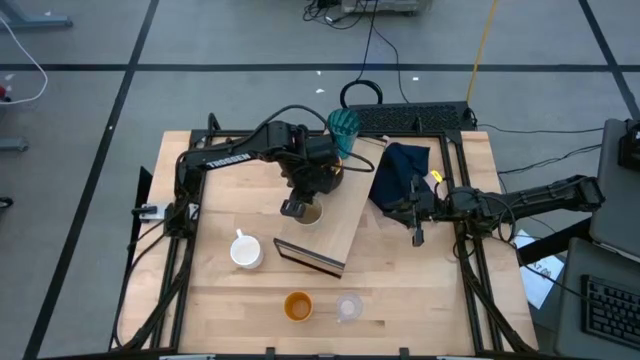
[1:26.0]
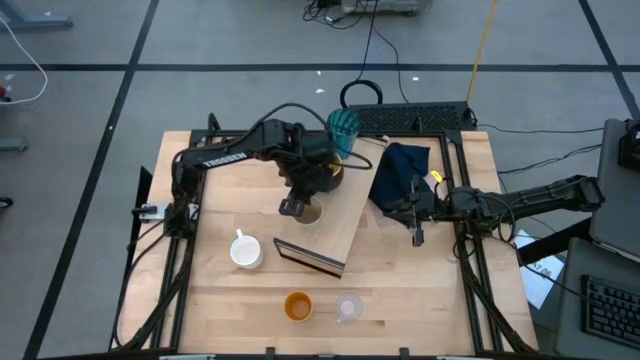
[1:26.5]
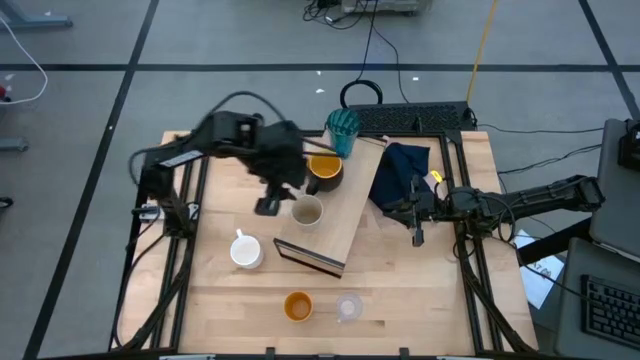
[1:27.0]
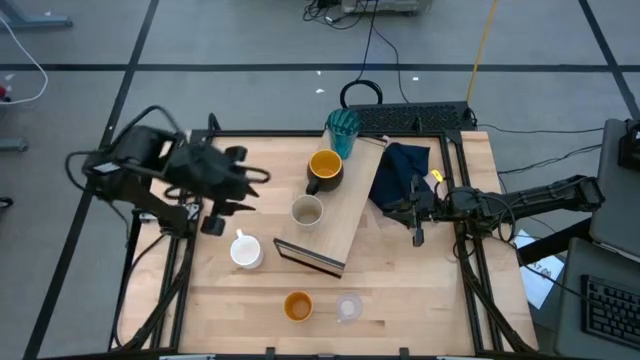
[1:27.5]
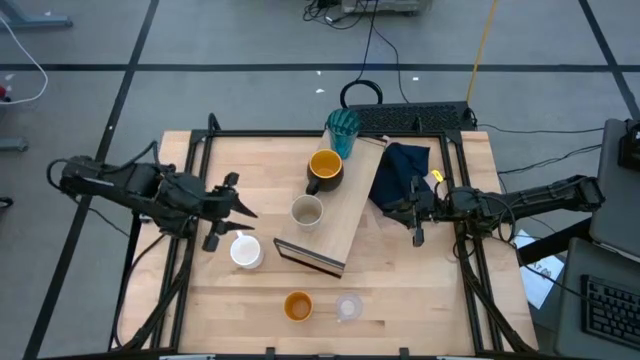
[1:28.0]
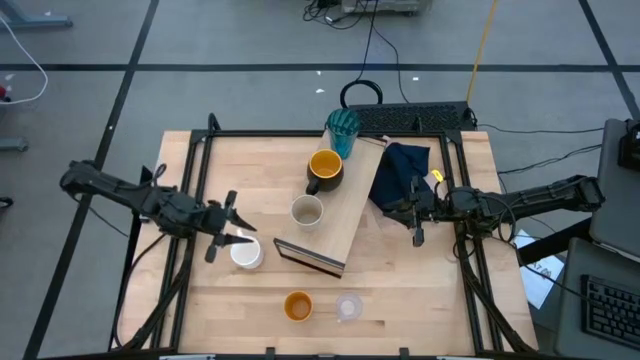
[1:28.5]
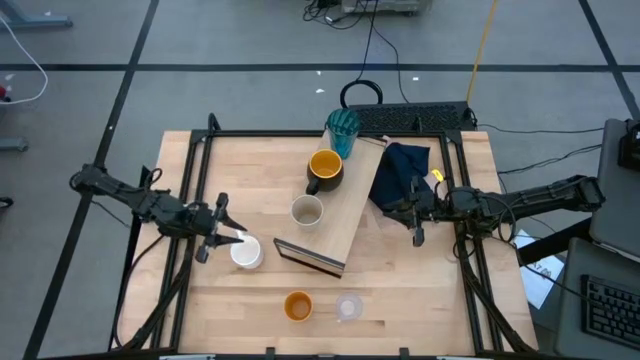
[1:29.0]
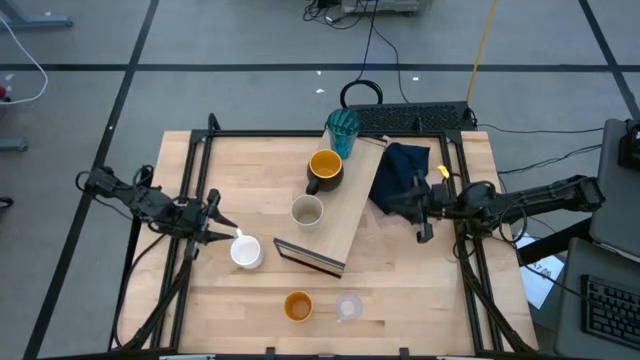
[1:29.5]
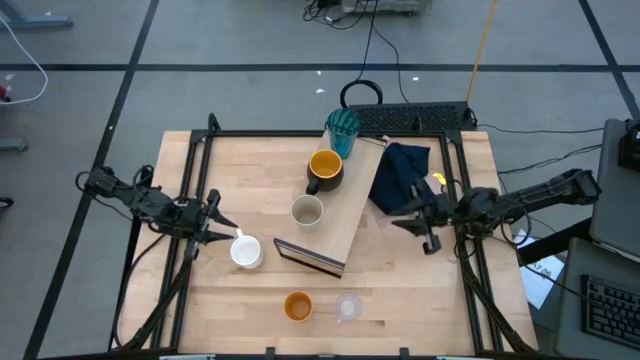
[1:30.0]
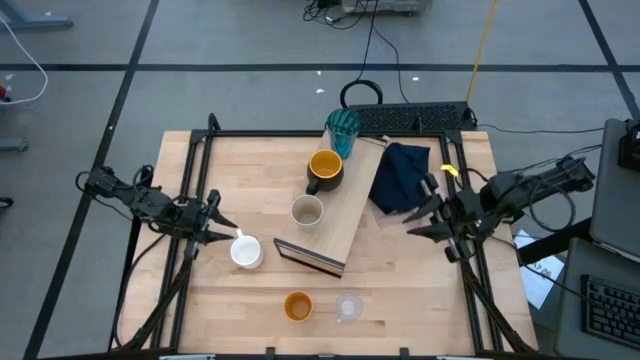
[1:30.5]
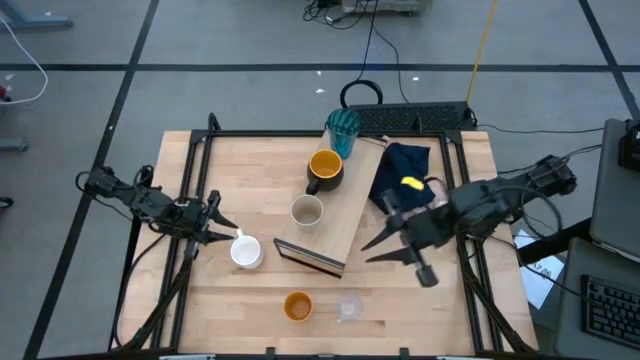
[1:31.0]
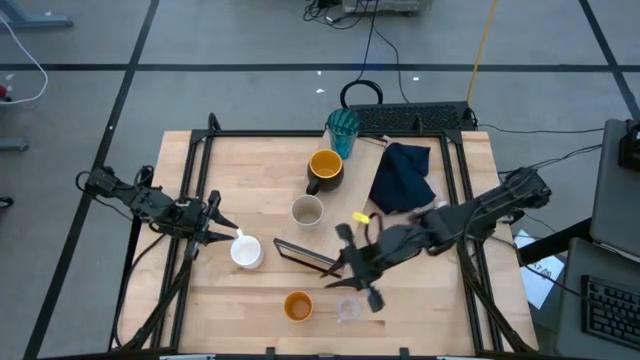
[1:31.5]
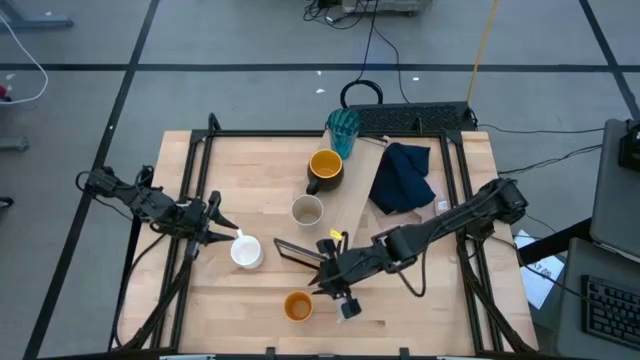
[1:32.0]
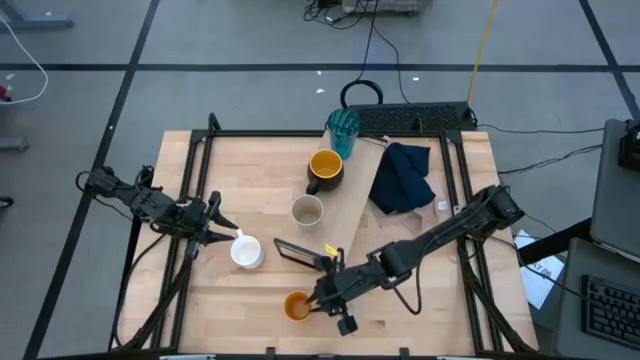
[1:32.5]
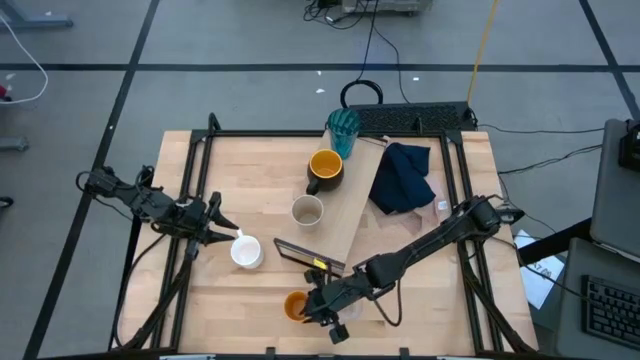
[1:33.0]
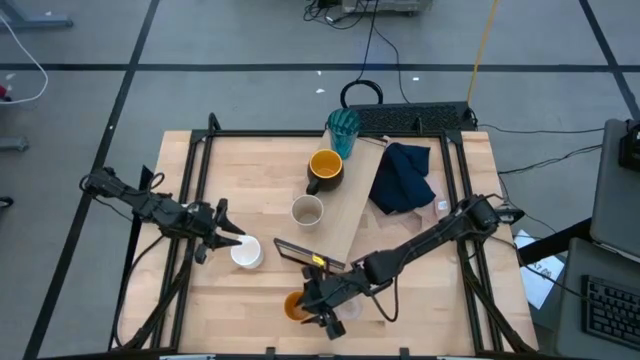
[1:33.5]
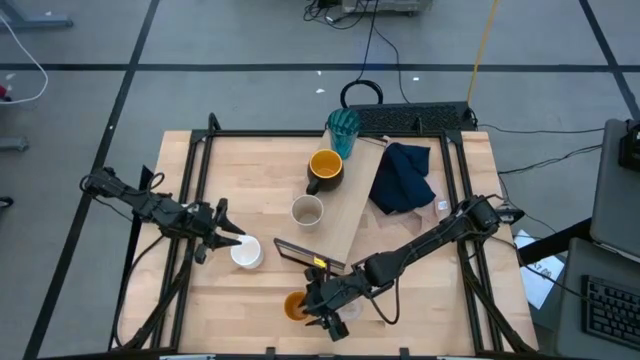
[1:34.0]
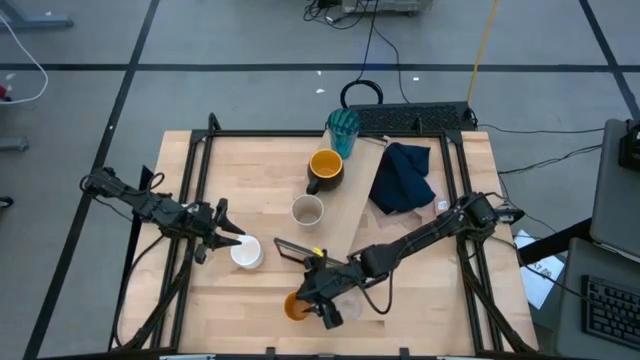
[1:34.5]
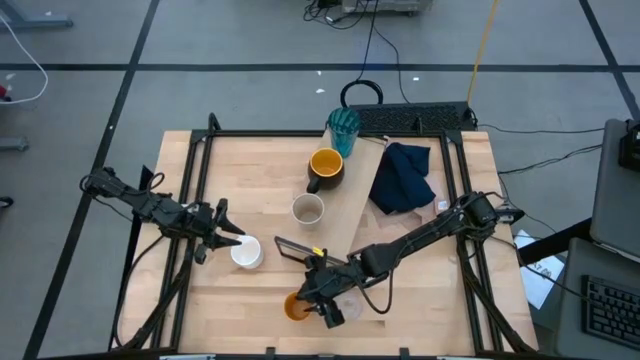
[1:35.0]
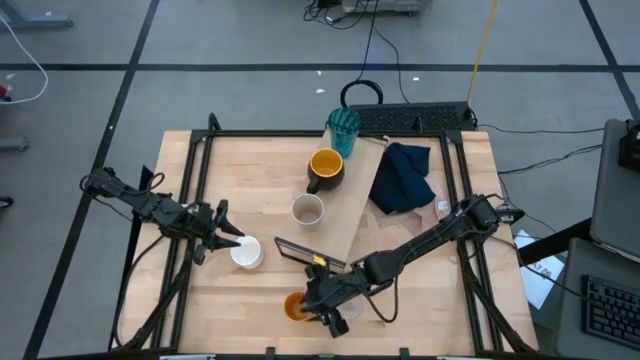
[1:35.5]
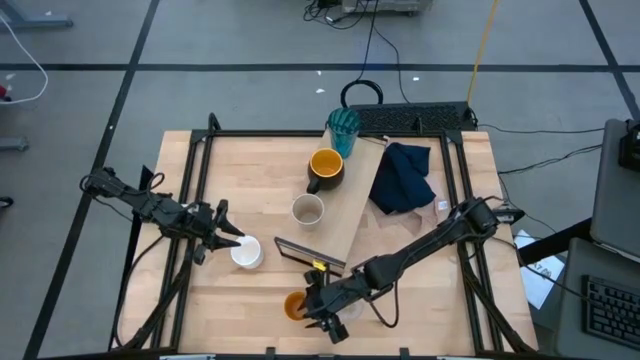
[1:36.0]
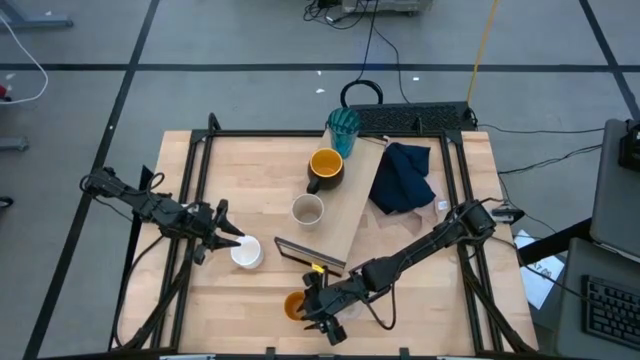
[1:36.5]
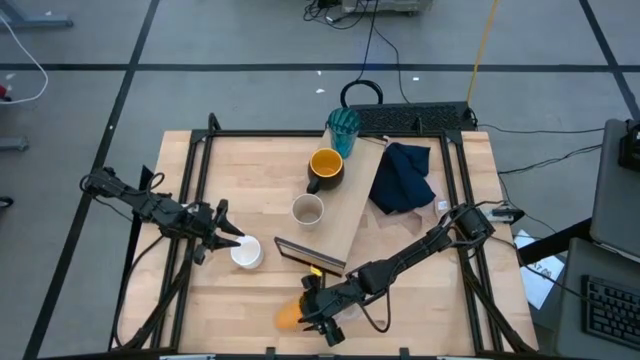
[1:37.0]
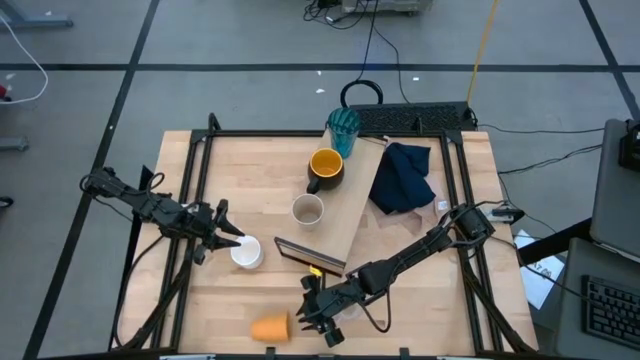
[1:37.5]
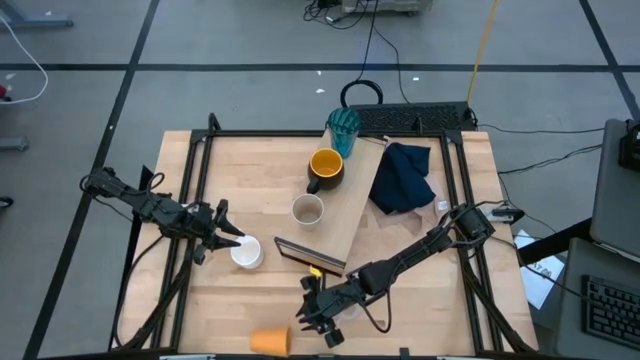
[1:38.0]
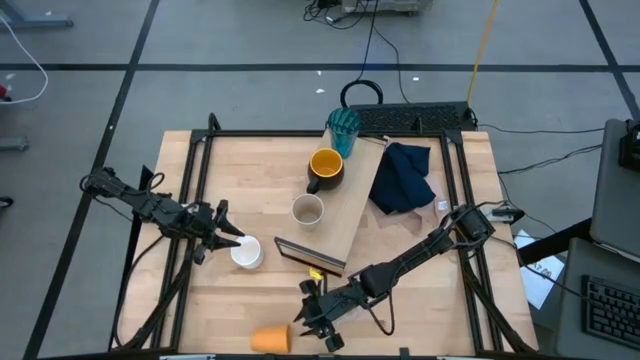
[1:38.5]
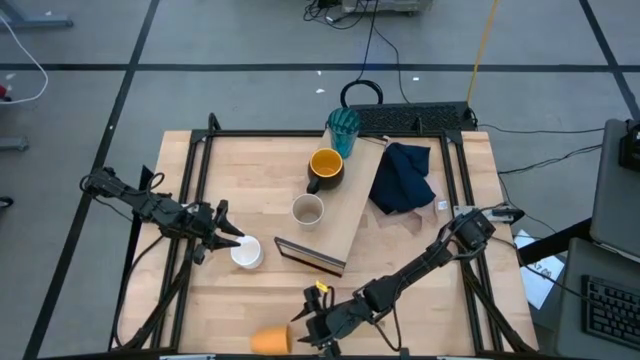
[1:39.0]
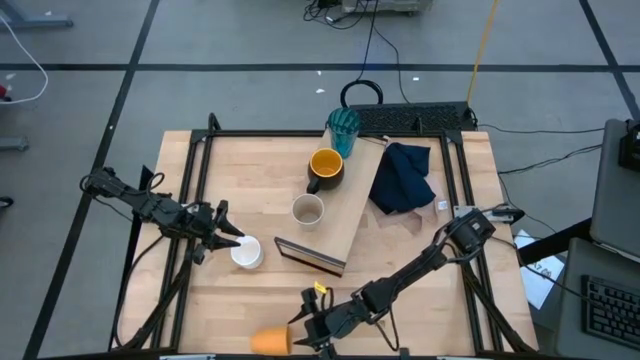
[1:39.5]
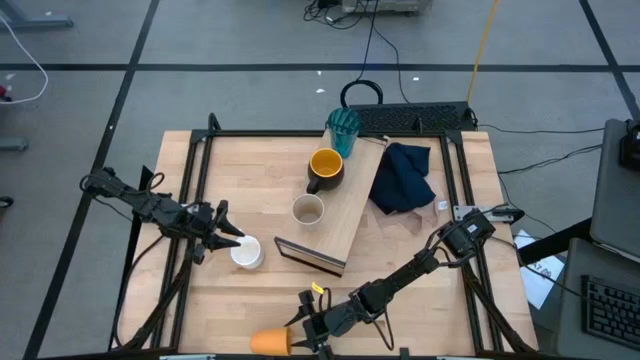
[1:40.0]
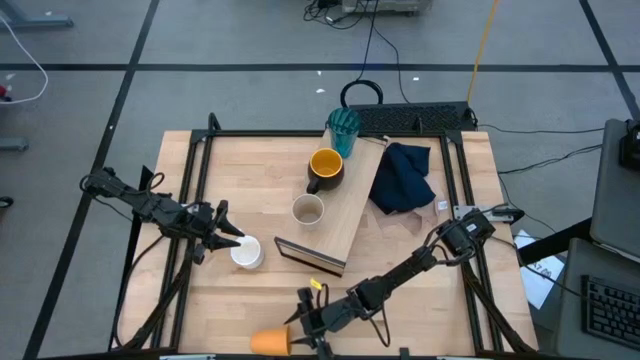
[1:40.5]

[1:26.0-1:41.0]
Task: Stack small to large cups/mugs on shelf
Put the yellow cup on the shelf

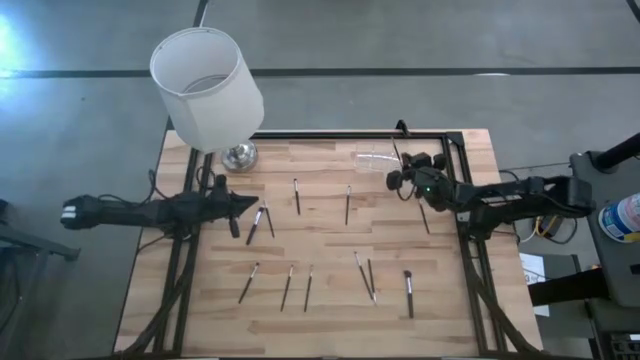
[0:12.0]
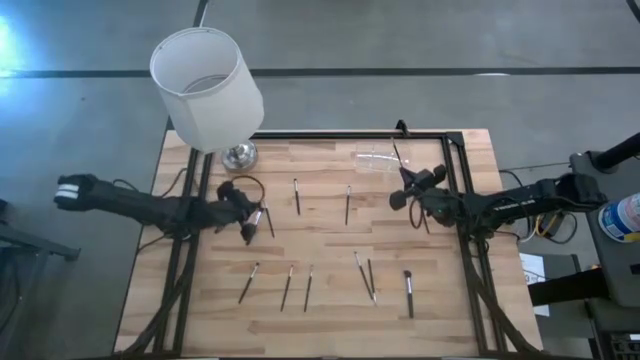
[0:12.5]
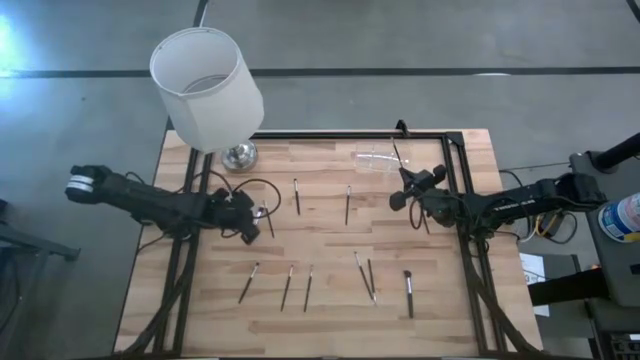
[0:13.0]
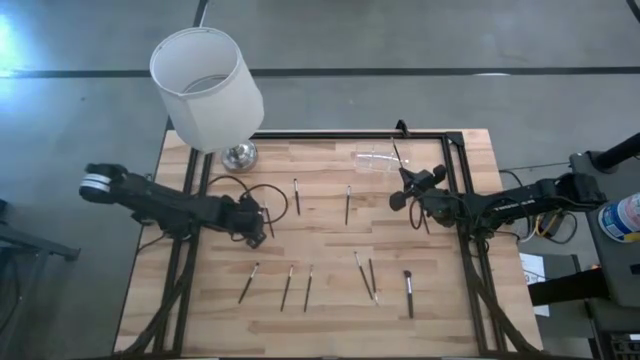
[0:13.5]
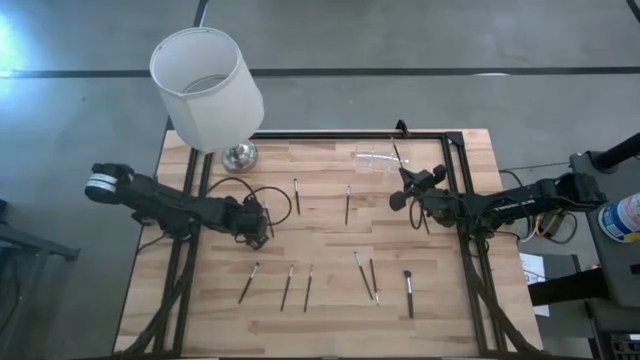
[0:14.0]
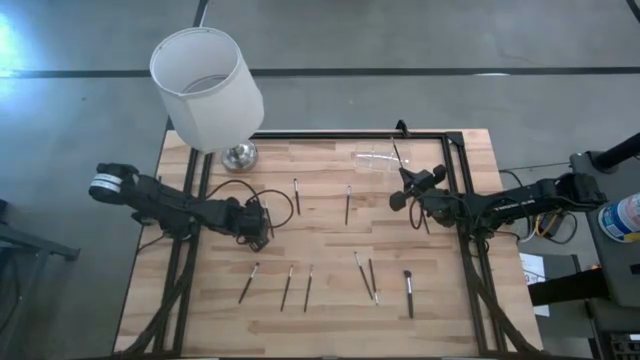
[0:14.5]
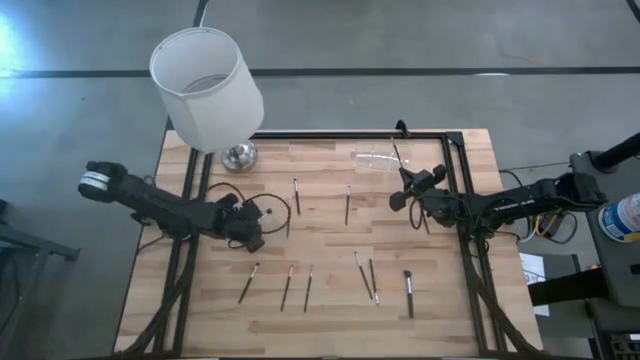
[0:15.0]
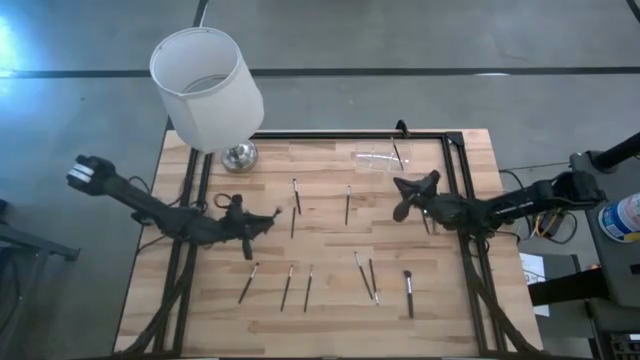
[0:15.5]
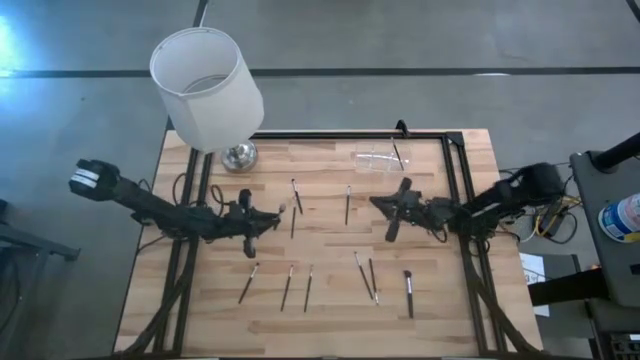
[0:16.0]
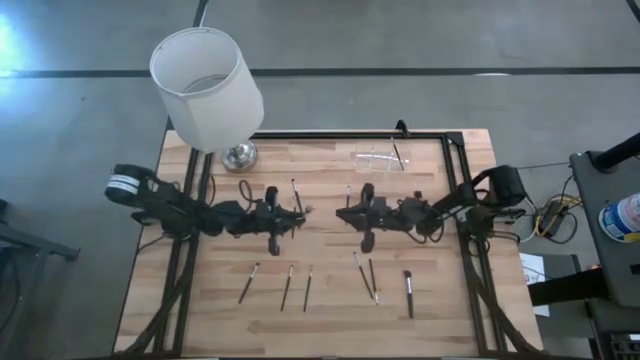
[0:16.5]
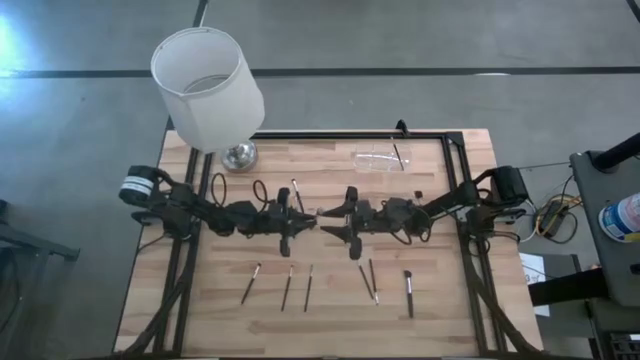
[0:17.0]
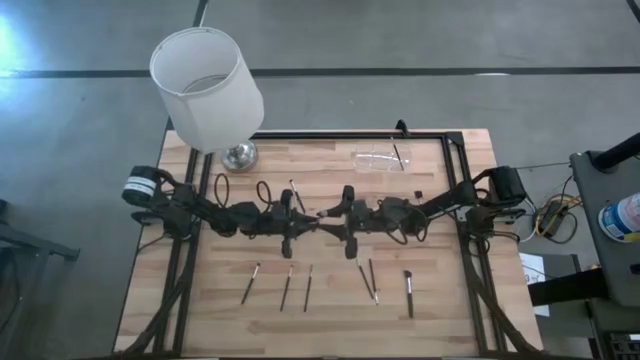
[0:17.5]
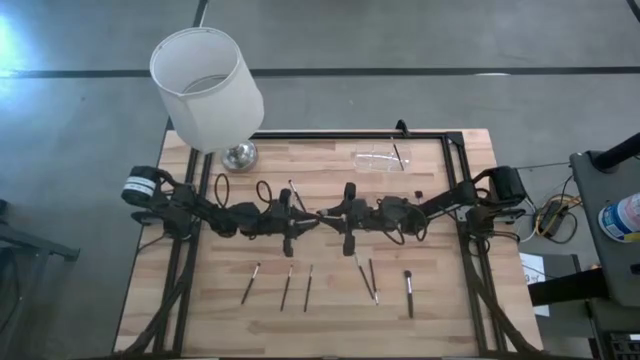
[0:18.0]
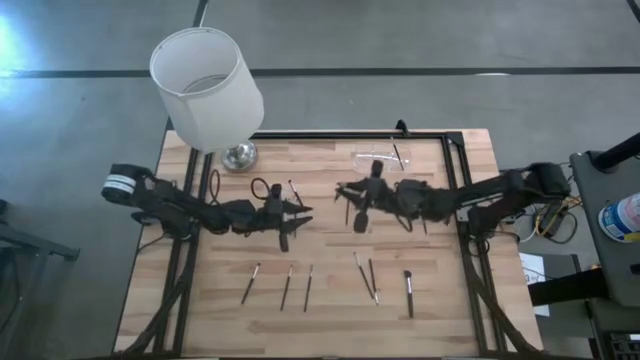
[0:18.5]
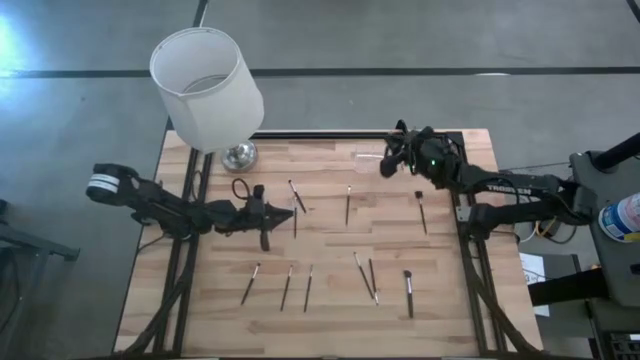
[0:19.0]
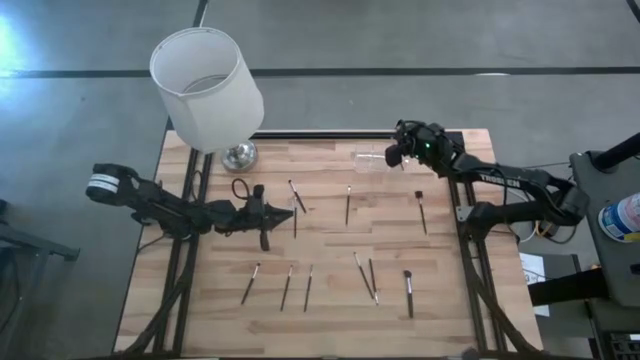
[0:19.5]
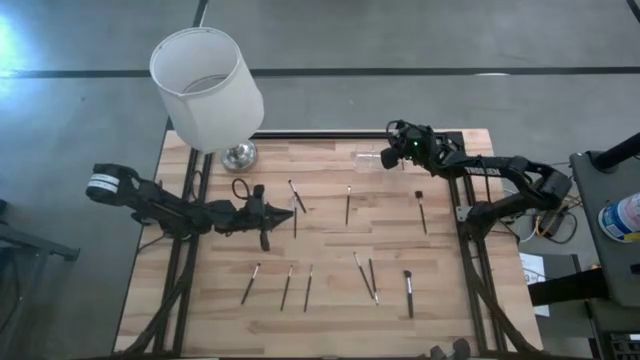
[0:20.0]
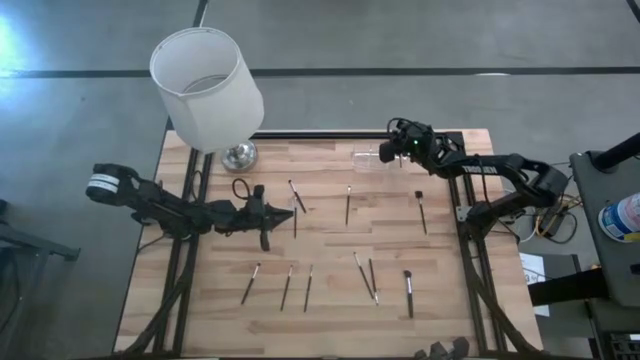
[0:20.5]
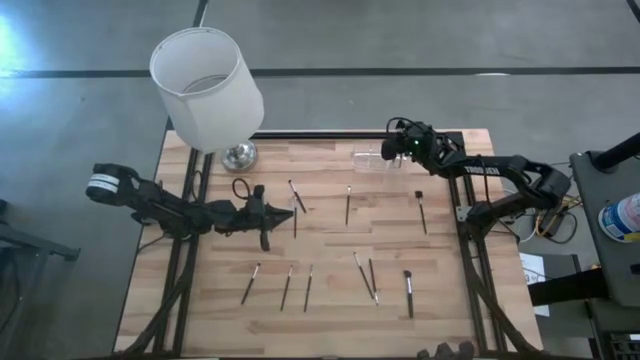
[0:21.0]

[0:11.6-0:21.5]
Task: Put items in baskets/containers
Put the foundation brush into the transparent organizer
